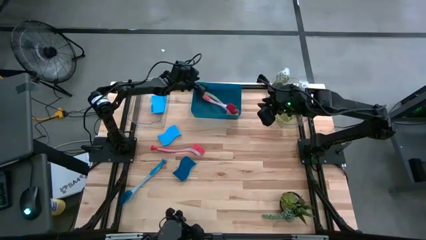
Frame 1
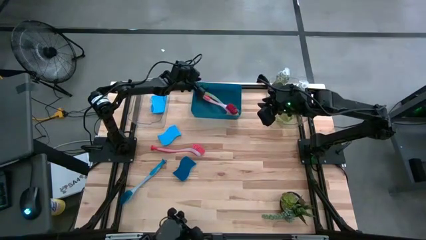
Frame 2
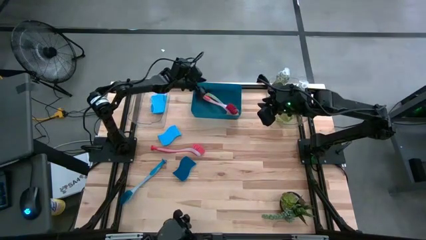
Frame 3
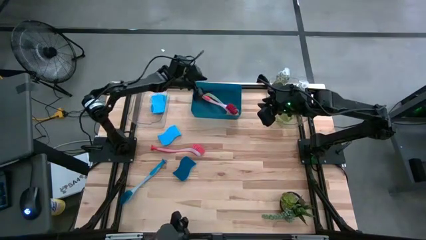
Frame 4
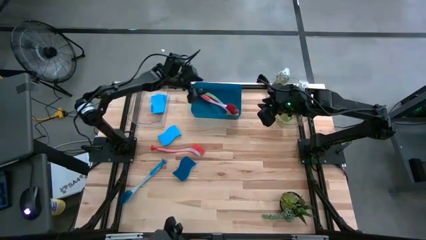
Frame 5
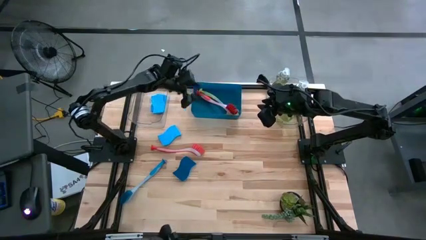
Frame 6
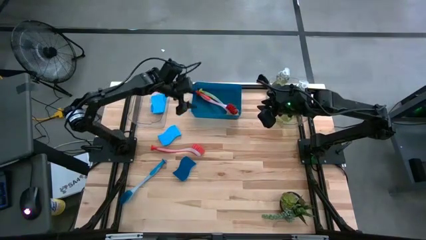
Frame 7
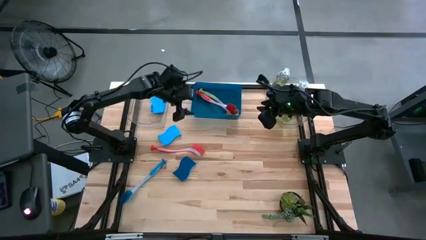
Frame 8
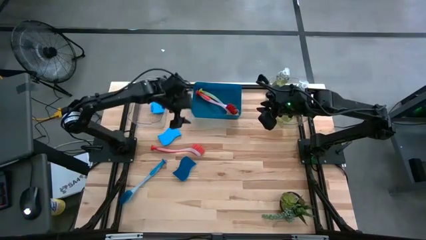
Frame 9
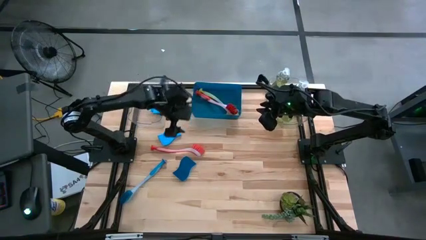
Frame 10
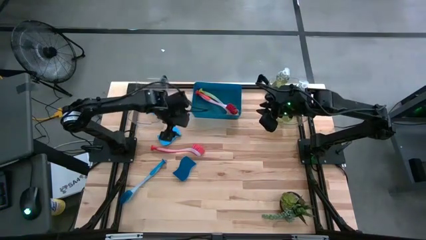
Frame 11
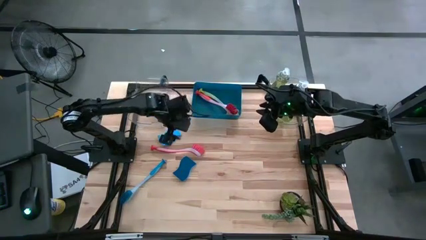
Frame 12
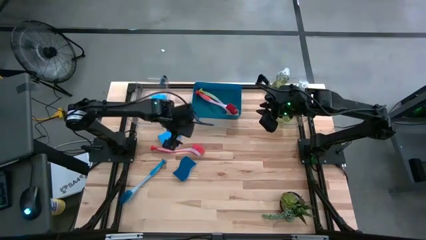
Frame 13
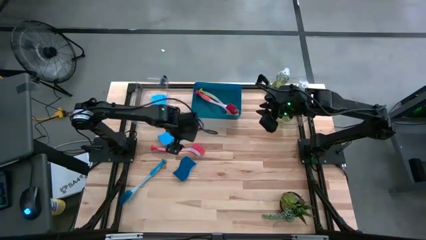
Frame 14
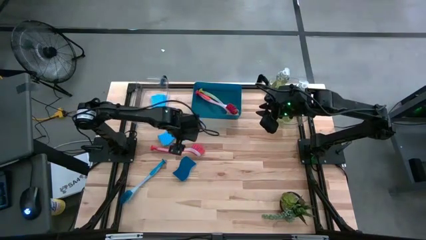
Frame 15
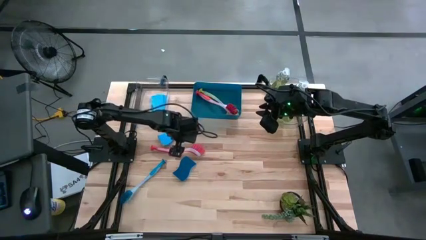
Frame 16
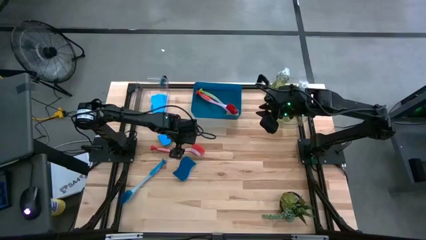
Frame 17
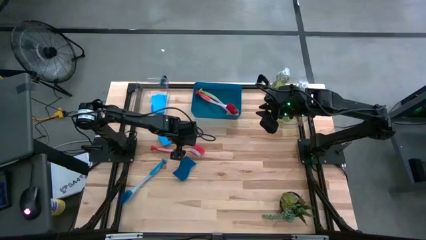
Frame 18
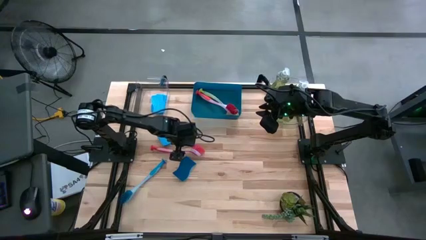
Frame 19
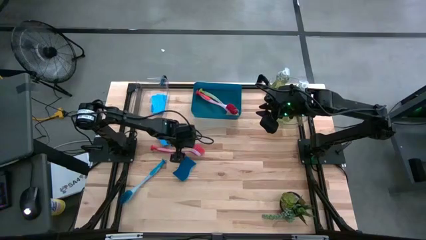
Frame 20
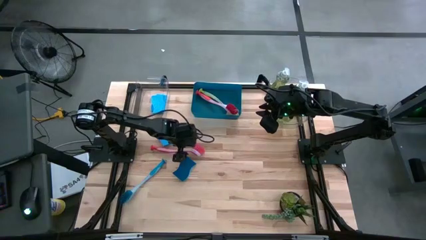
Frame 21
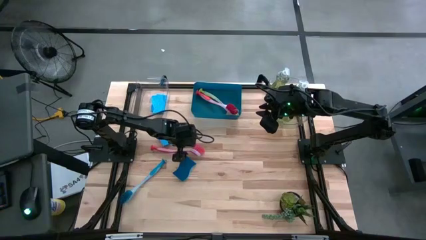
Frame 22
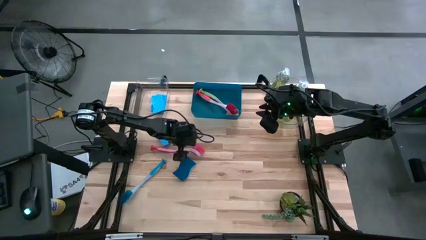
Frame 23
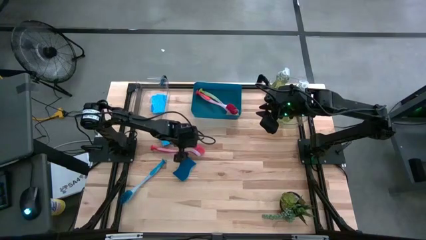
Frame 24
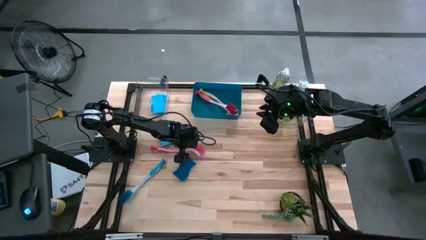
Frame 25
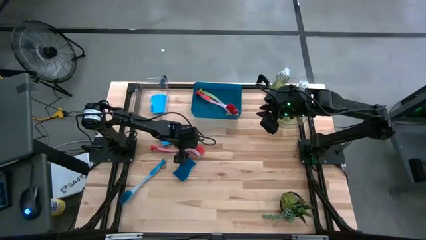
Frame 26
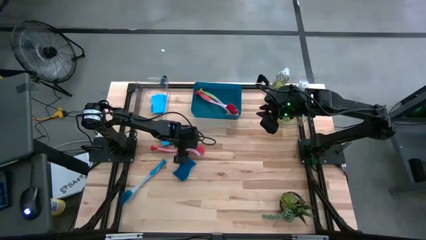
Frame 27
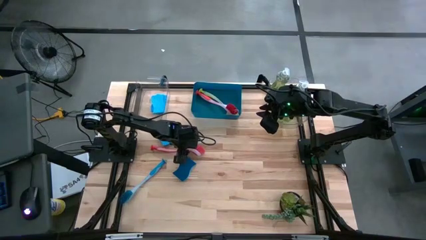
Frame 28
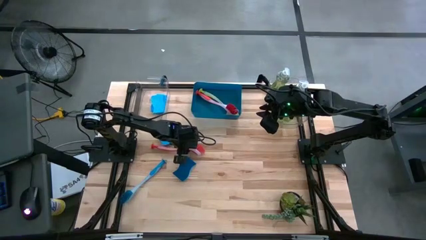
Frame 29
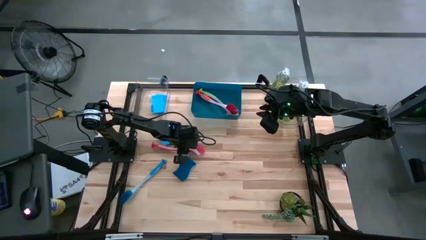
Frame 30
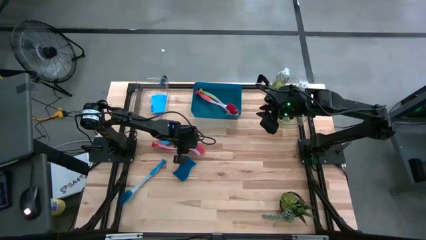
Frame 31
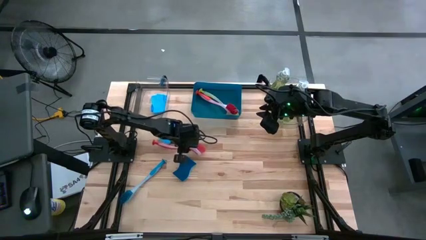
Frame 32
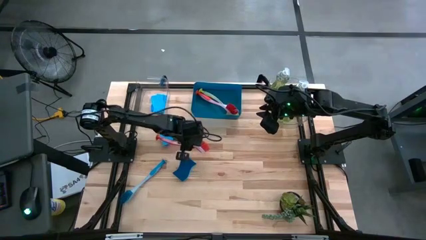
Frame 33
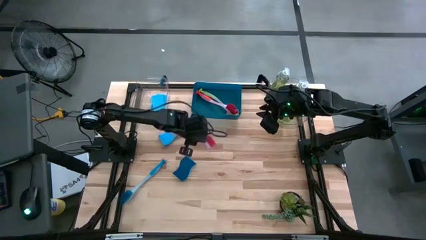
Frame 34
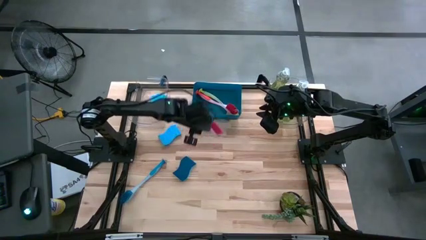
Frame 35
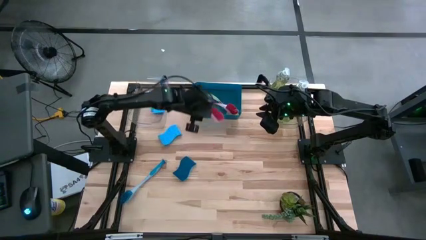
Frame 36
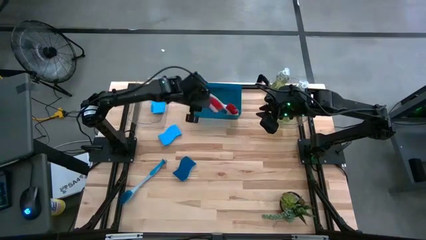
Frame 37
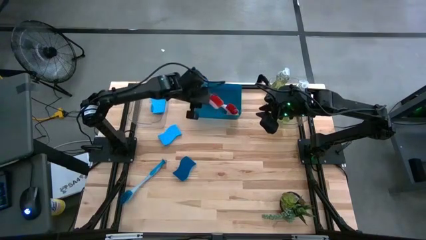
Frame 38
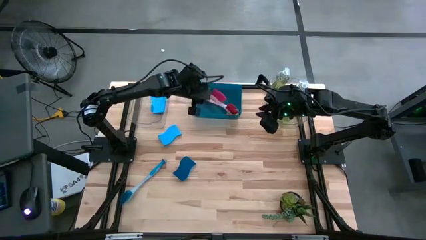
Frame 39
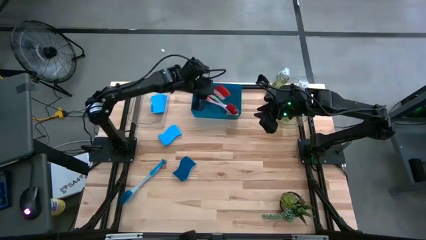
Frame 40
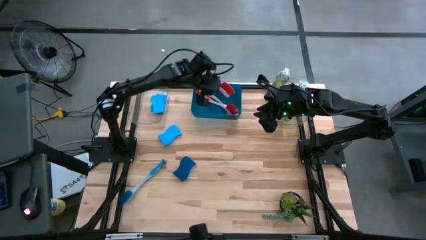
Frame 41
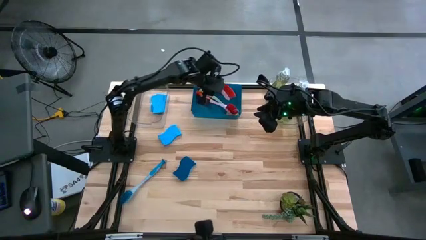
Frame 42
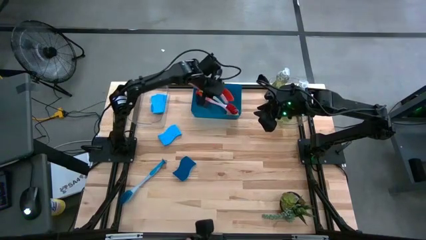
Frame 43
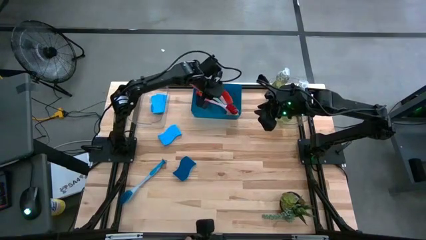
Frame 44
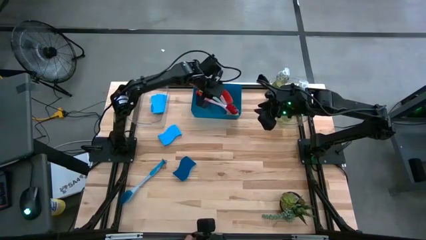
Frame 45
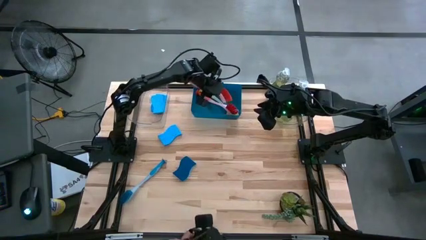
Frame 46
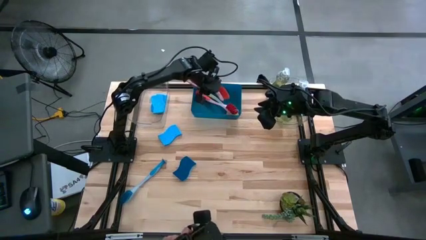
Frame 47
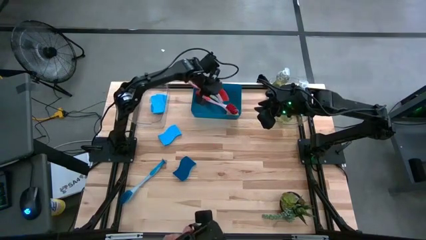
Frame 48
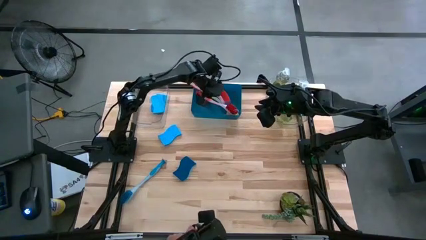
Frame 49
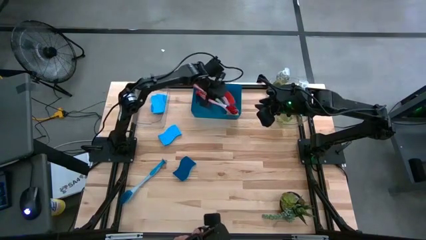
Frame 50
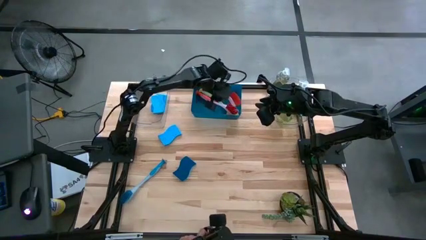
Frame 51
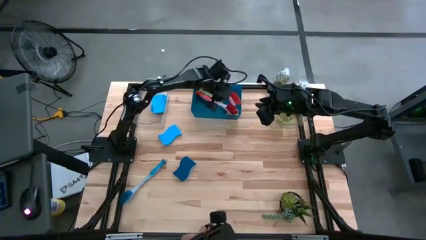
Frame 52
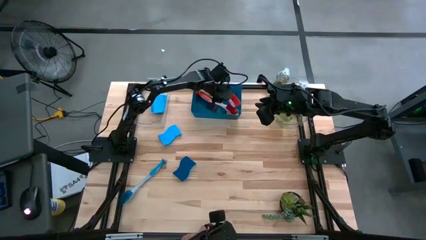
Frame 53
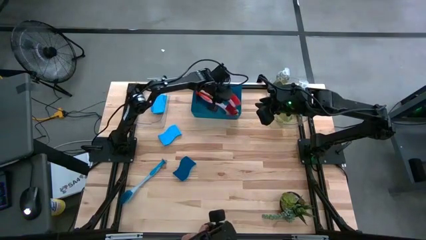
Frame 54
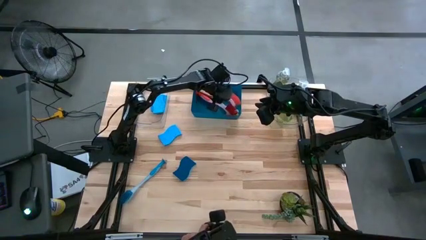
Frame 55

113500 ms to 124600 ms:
Task: Pick & Place Kitchen Sink Supplies
Put the red dish brush into the blue bin

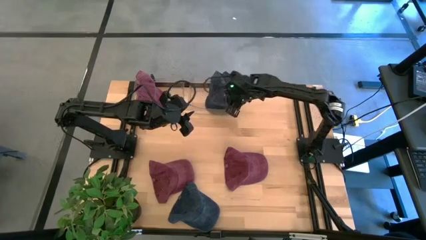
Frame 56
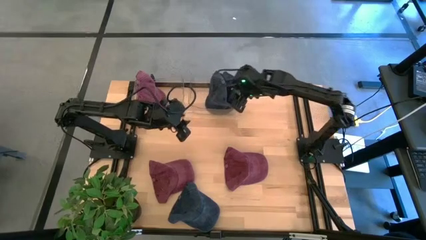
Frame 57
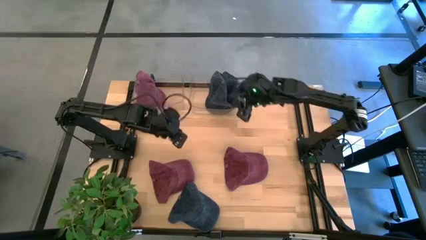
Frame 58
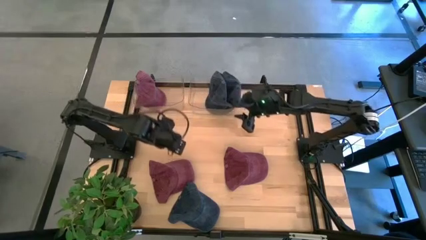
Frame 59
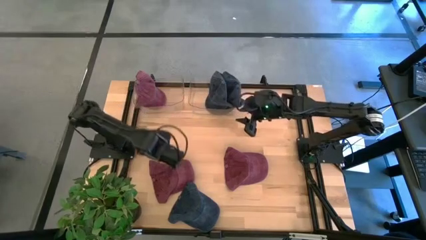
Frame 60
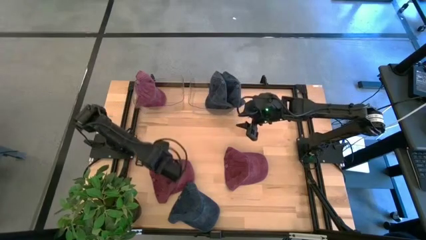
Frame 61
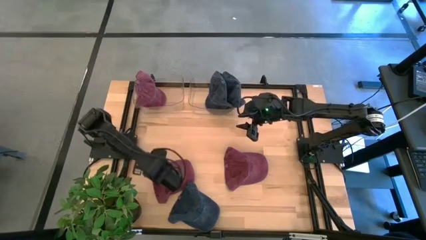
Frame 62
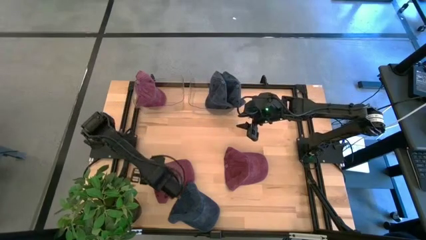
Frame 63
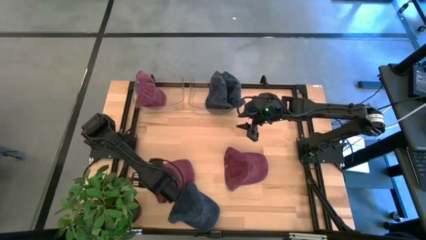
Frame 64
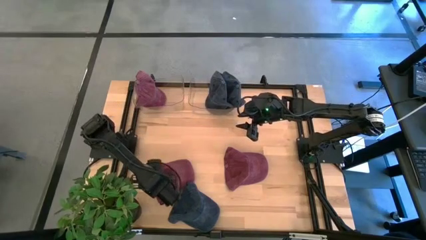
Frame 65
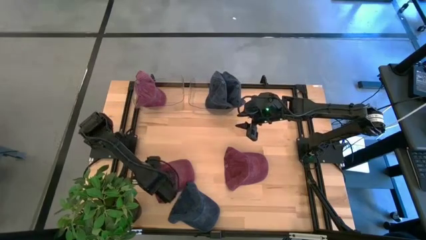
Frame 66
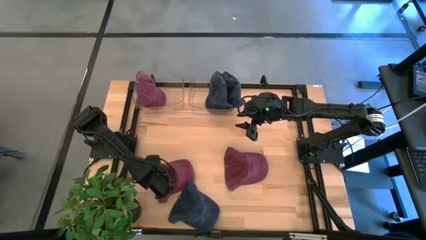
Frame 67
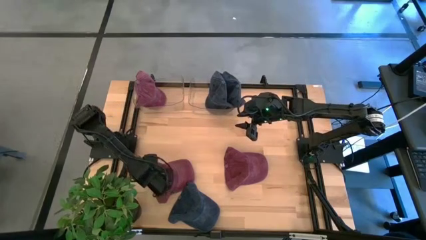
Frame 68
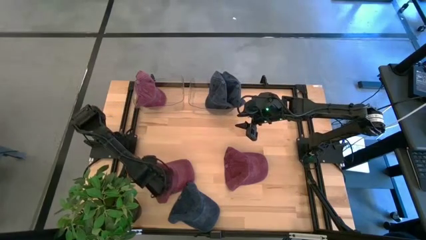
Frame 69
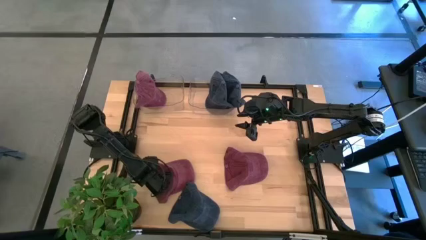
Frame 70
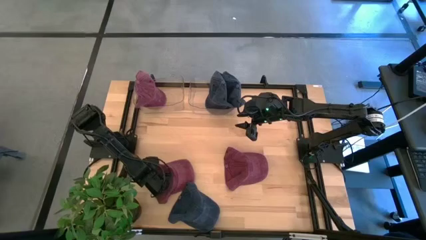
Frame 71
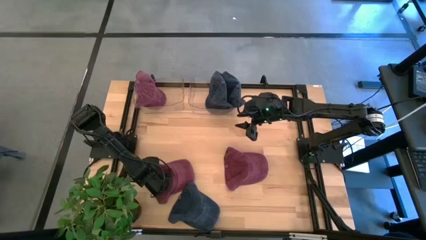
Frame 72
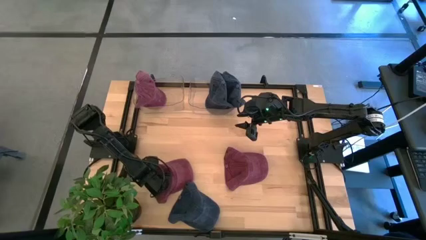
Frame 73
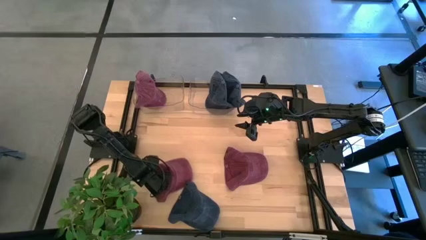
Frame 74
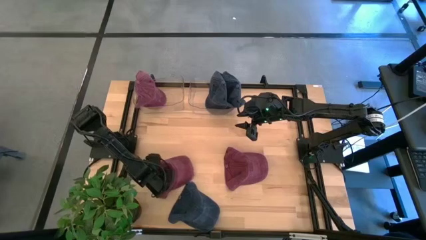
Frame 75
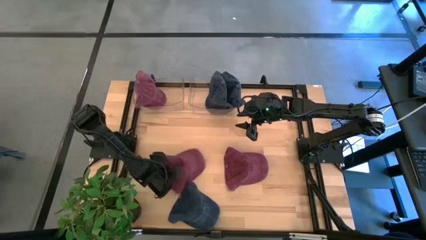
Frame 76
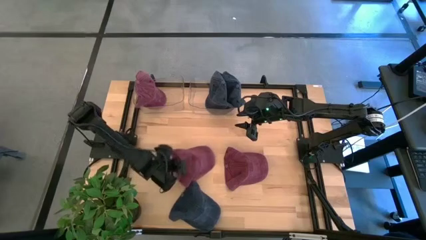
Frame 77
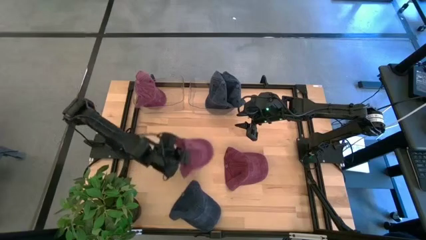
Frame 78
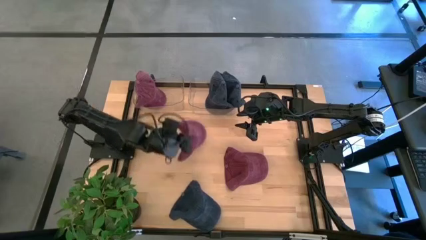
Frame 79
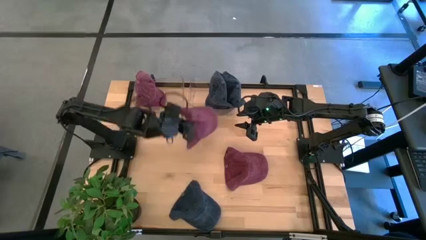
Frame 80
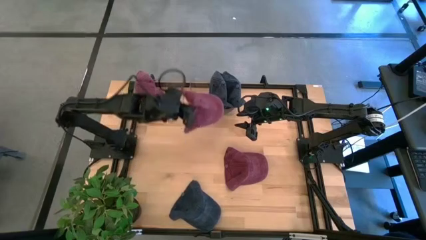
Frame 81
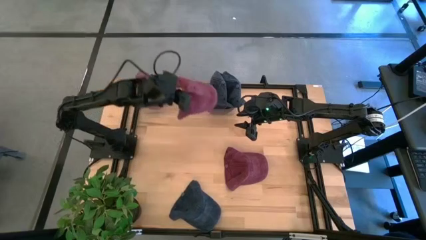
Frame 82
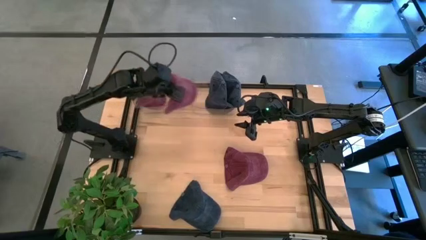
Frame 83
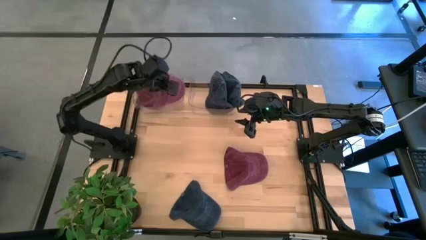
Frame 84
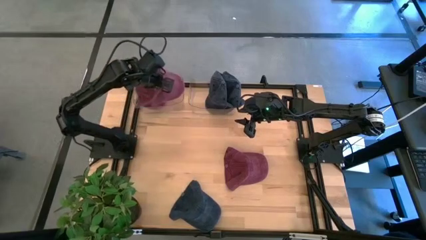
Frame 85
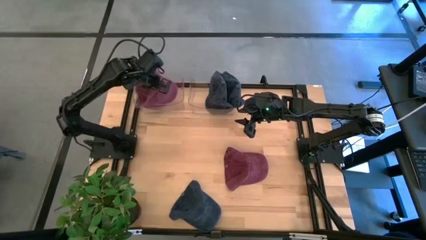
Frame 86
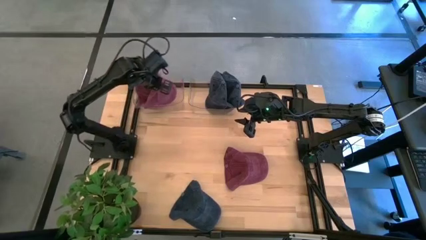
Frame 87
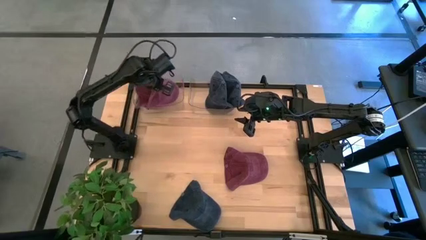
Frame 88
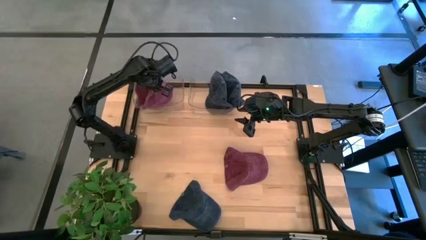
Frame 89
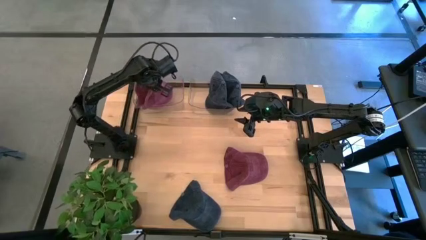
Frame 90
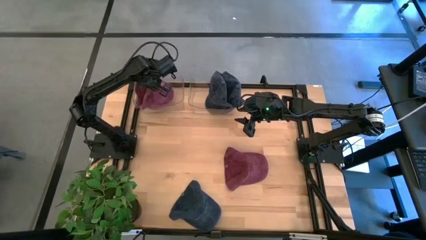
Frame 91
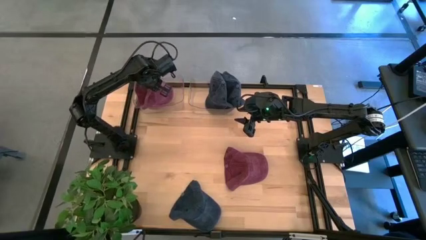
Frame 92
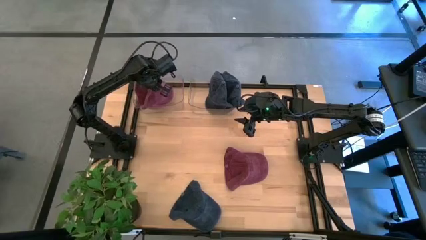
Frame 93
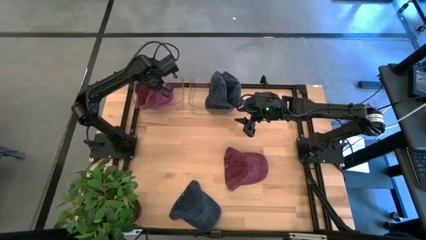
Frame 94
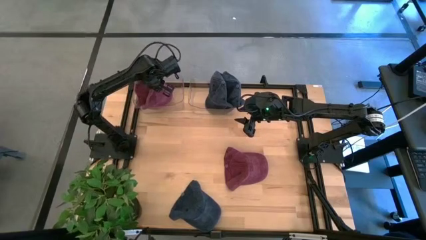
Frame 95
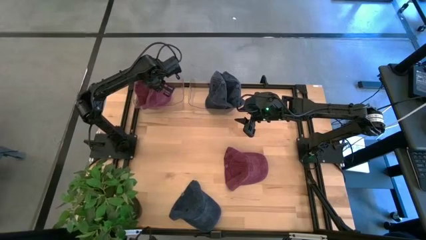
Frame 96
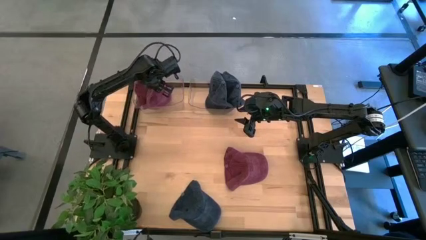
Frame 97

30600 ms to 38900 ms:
Task: Pick & Place hat
Put the left dark red cap into the left transparent bin
